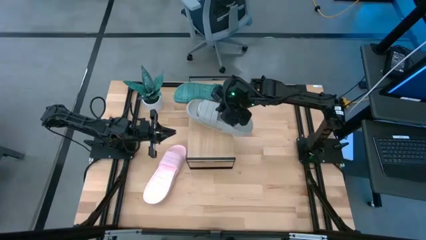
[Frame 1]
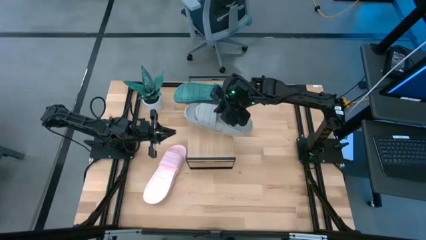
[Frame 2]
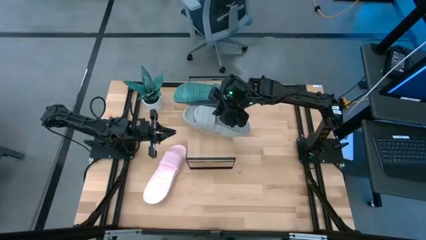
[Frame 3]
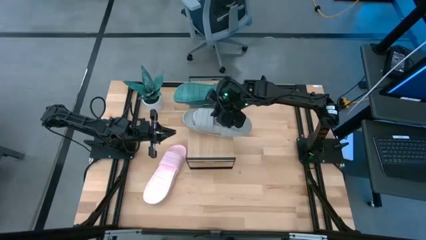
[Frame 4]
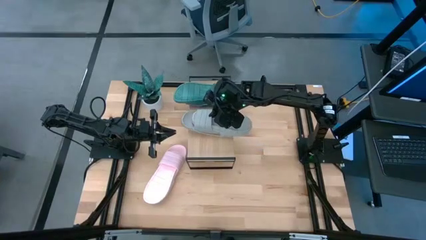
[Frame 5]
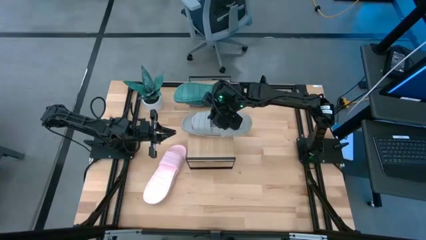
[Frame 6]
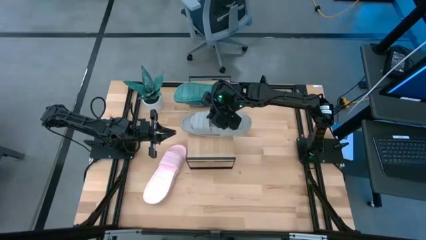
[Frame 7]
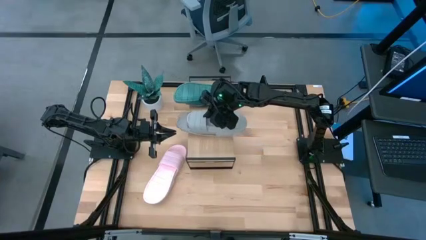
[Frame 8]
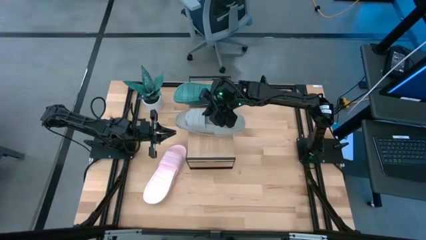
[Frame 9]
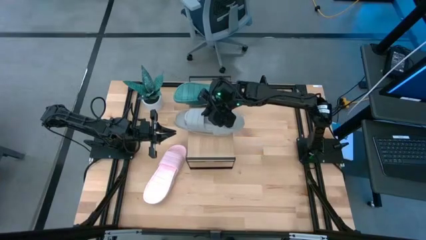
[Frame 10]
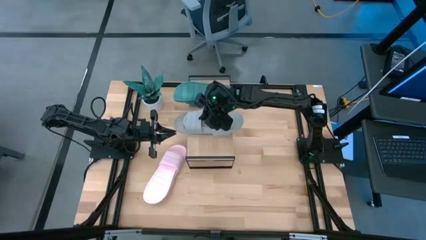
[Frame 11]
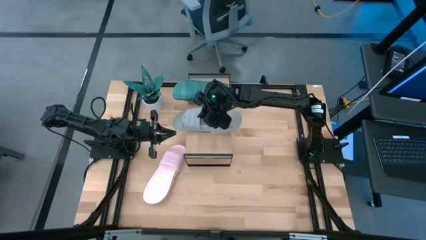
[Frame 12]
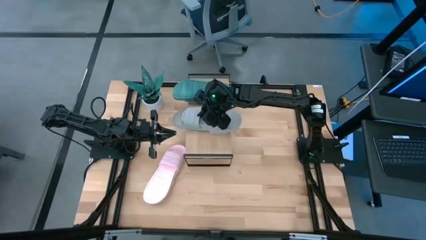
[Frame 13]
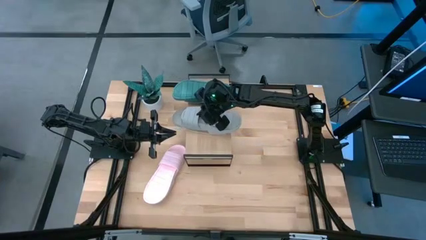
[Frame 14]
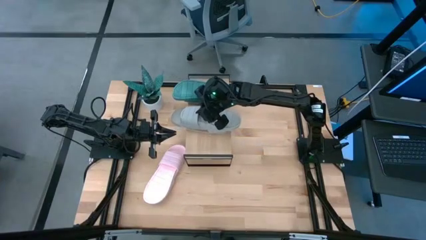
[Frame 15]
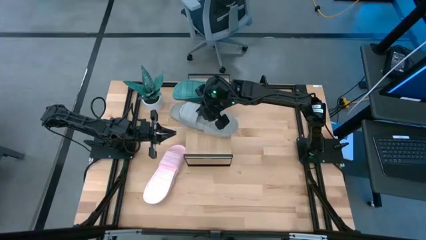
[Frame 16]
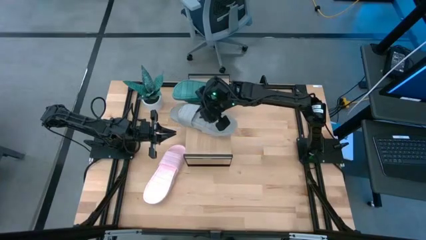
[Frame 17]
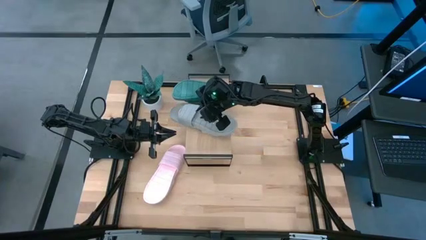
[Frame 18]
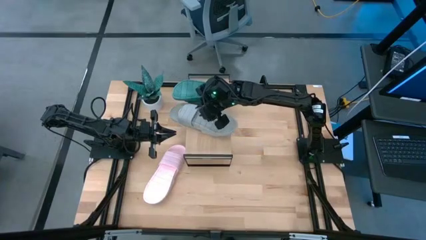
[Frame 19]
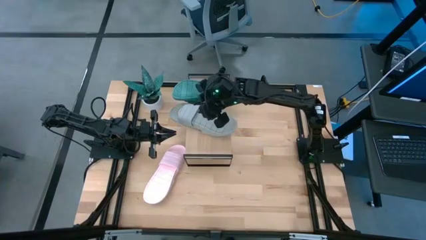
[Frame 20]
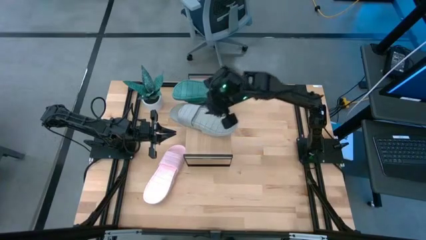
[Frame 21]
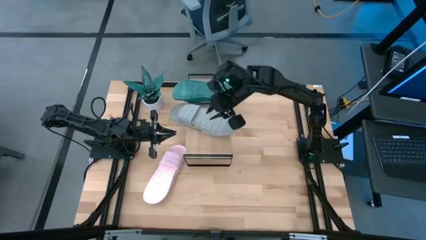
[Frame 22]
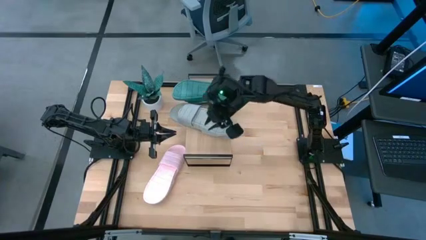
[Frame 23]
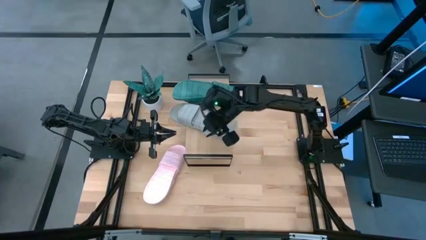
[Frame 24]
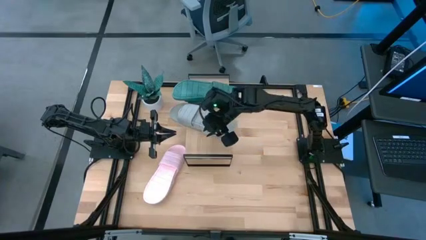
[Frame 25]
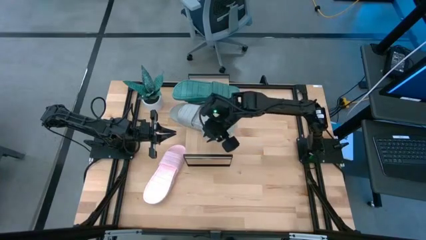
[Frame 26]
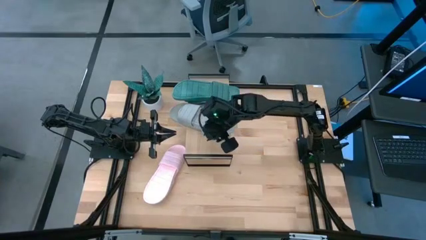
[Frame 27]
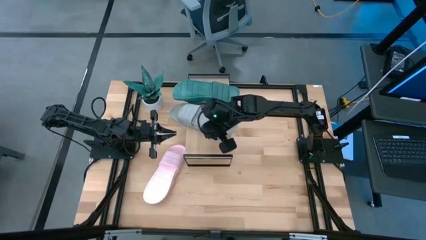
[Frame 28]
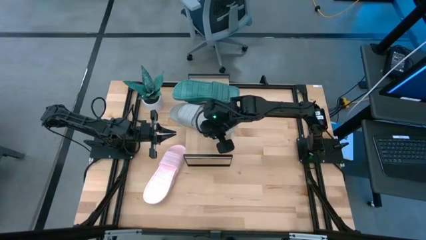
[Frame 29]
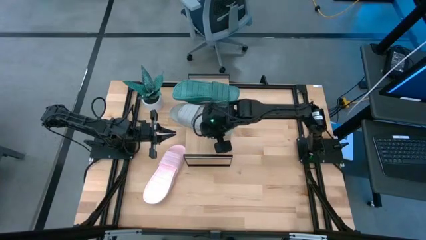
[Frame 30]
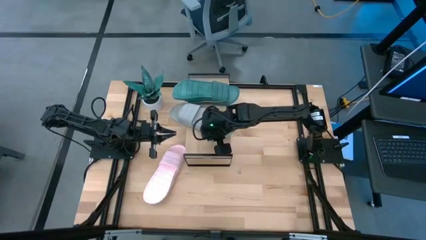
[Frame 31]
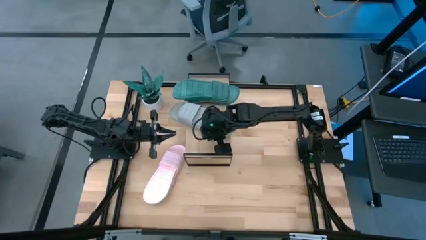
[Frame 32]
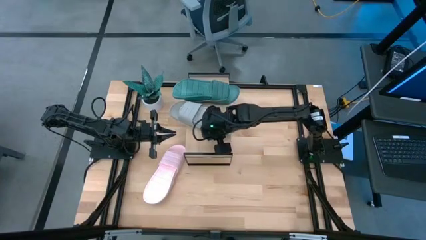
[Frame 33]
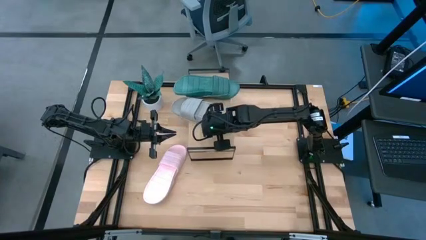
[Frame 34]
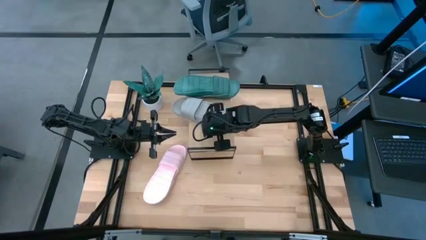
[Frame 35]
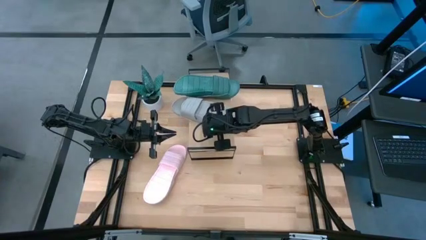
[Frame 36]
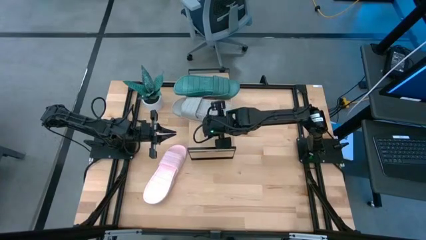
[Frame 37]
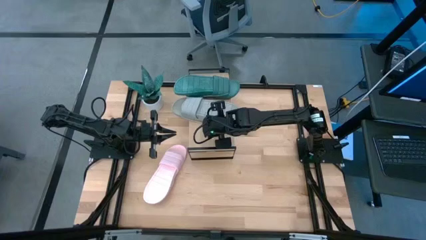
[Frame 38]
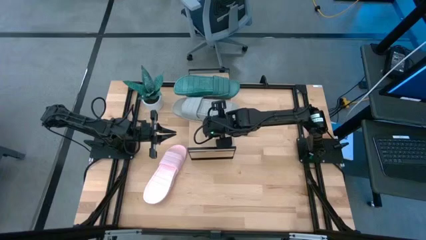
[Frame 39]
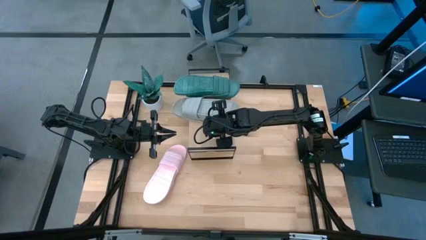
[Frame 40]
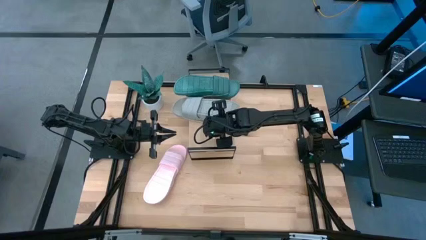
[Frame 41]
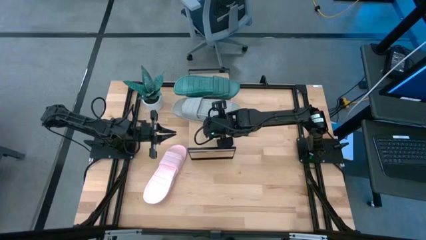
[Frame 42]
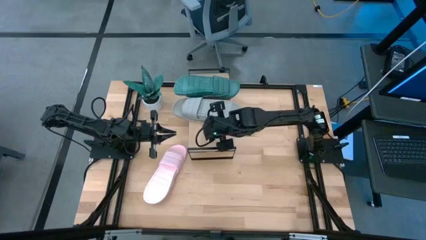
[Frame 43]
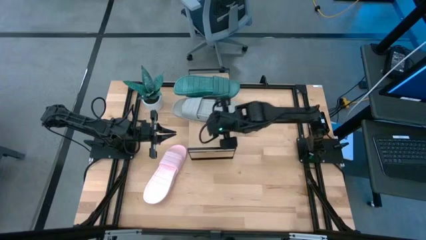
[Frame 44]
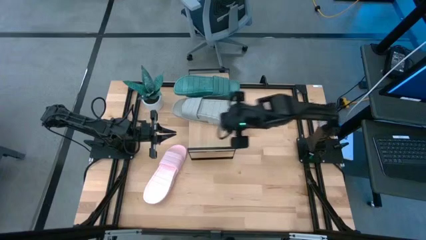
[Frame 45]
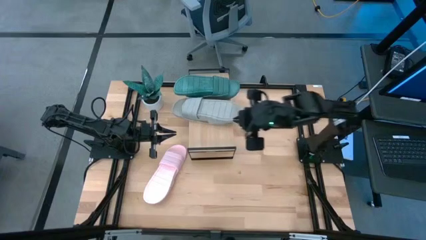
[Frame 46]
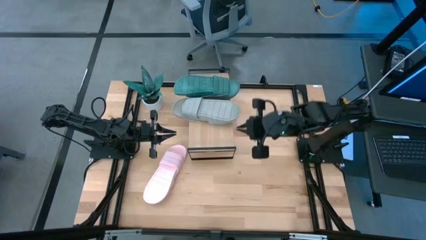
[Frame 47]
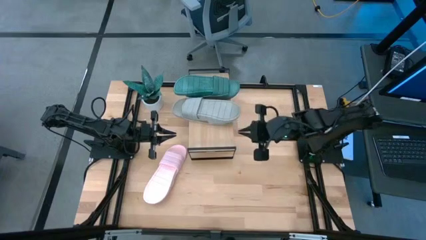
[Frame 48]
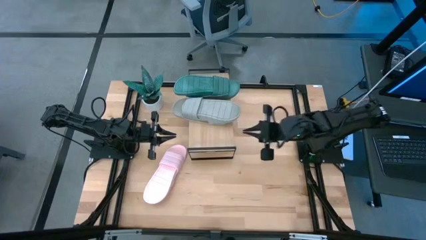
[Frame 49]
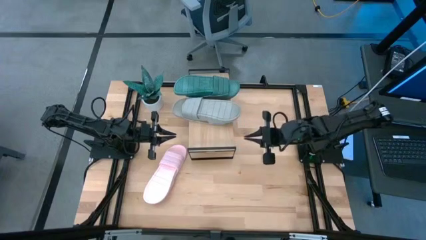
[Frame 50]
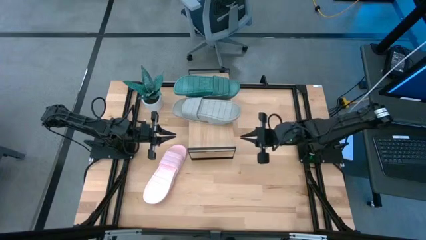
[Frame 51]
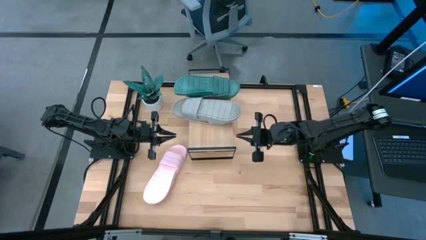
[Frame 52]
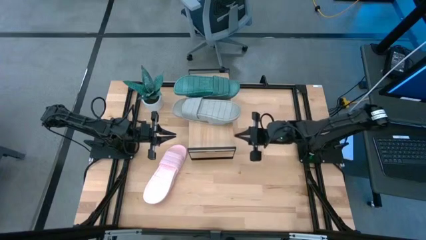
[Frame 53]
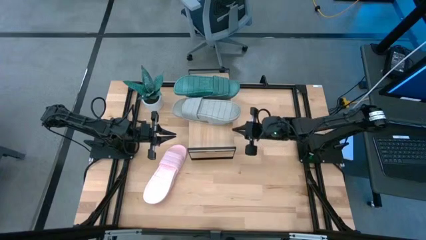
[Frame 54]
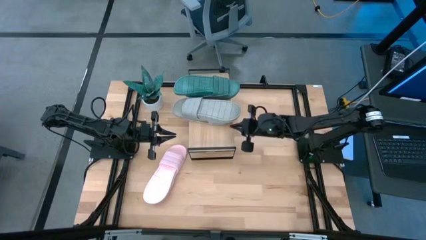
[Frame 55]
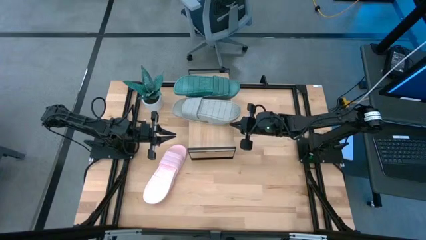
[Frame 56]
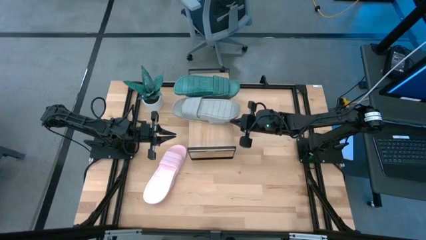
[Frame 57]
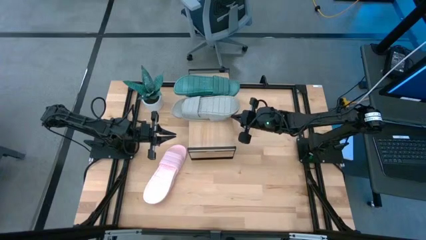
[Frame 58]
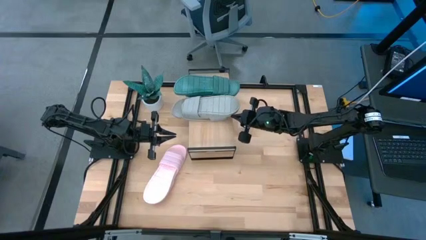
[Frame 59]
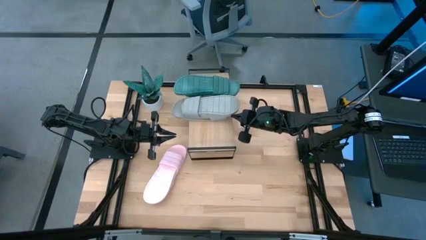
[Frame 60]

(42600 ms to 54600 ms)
Task: Pick and place slippers onto the shelf
Put the gray pair of slippers on the shelf
